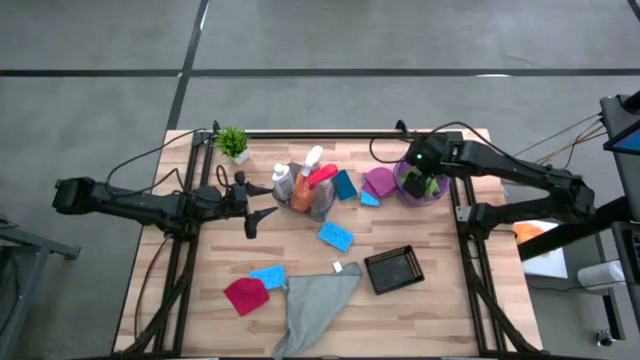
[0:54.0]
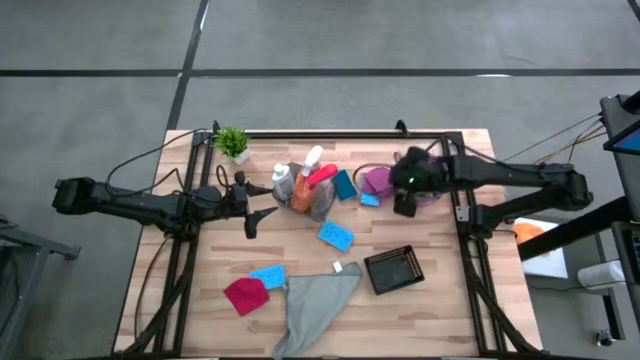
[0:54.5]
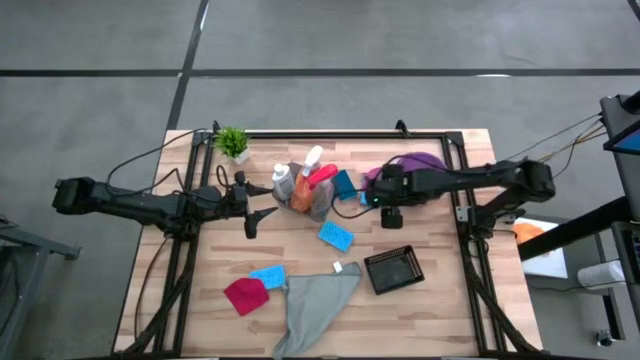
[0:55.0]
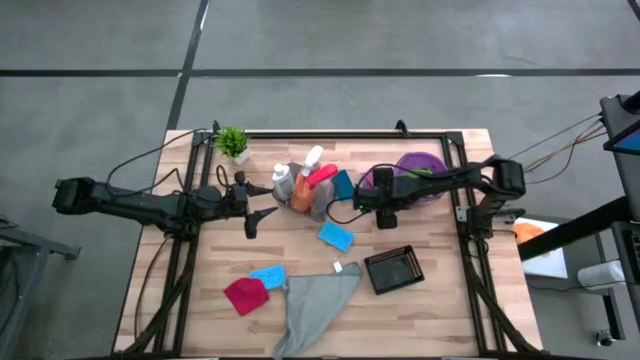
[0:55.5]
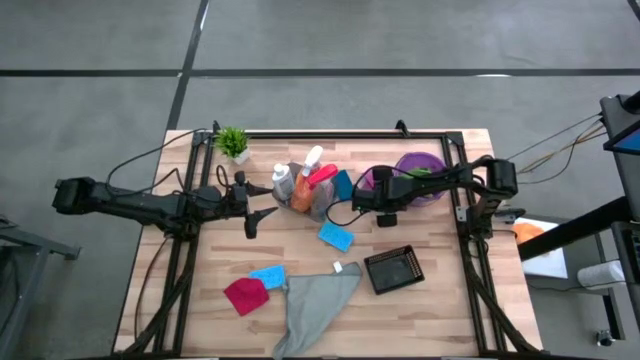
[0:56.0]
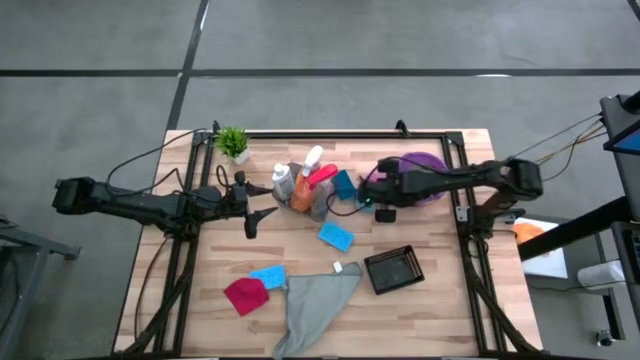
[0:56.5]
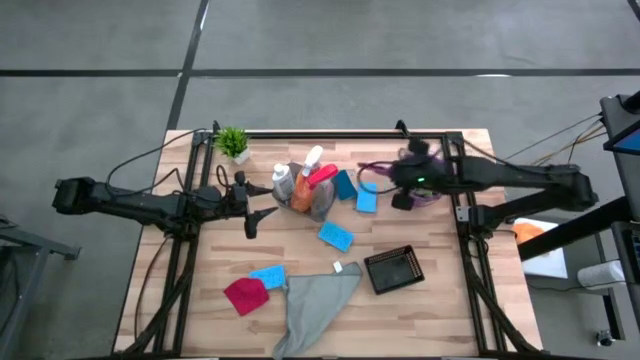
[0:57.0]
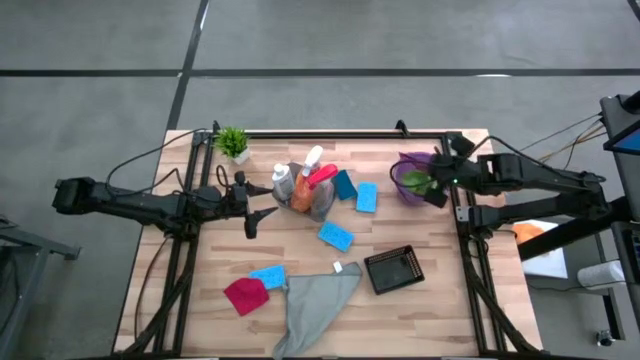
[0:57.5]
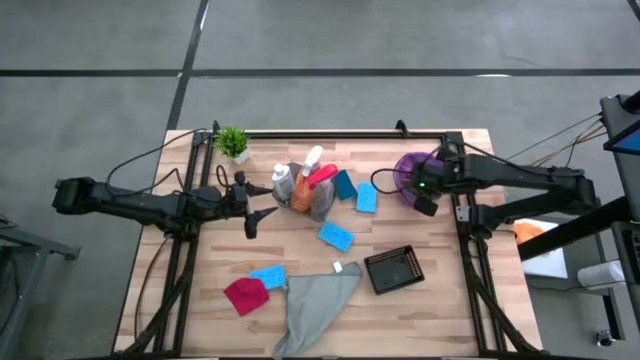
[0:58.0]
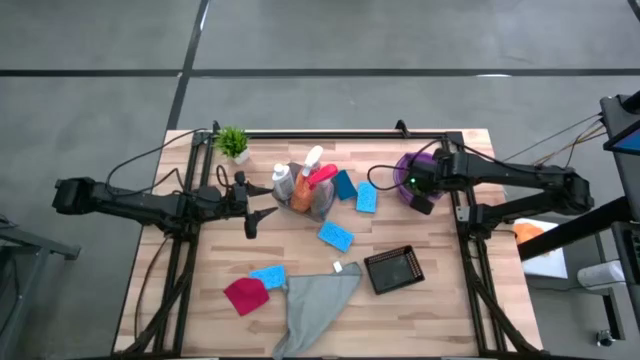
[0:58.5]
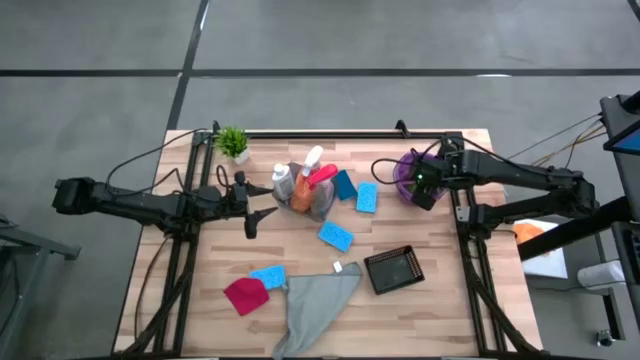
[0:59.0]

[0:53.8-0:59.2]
Task: Pick & Place Kitchen Items
Put the purple microfiber towel into the purple bucket

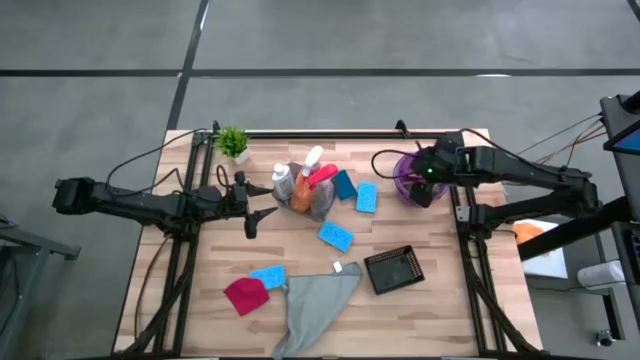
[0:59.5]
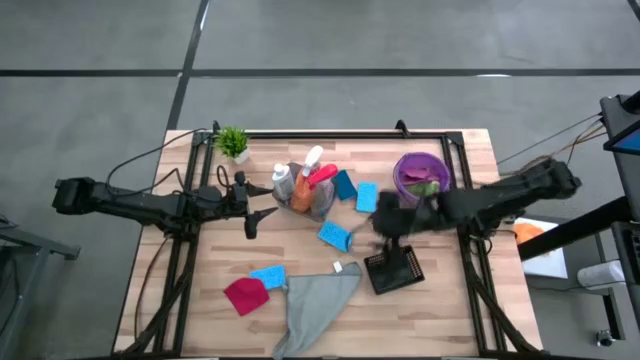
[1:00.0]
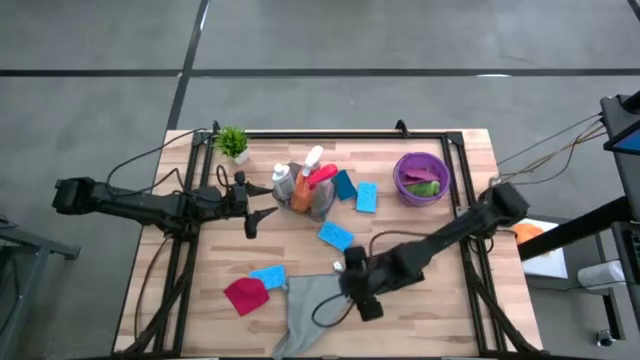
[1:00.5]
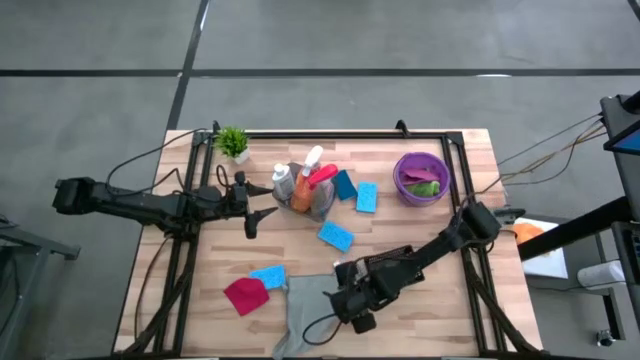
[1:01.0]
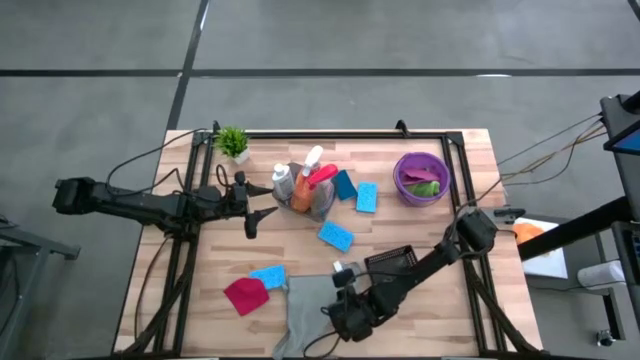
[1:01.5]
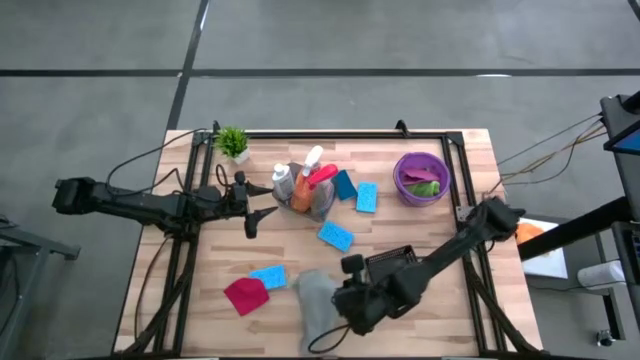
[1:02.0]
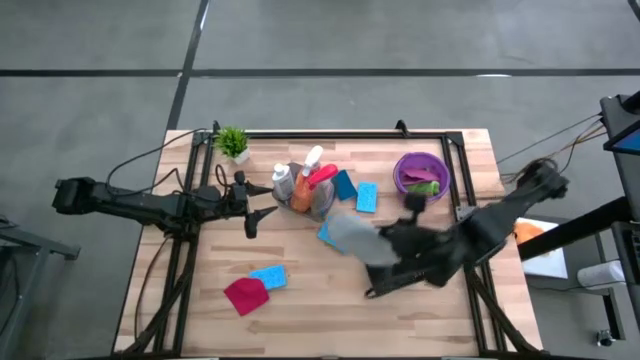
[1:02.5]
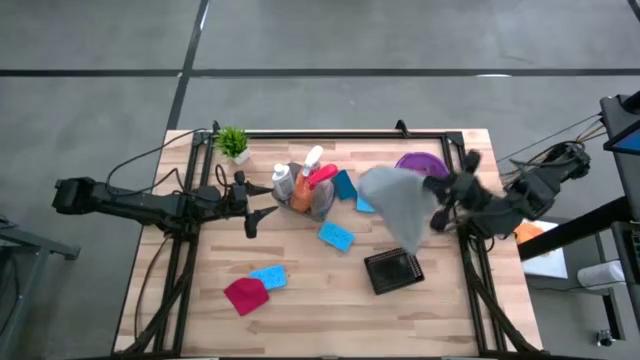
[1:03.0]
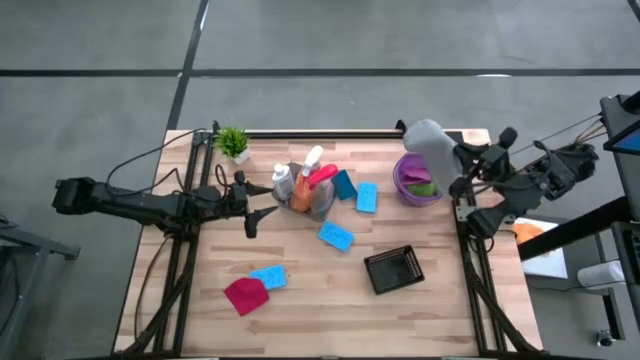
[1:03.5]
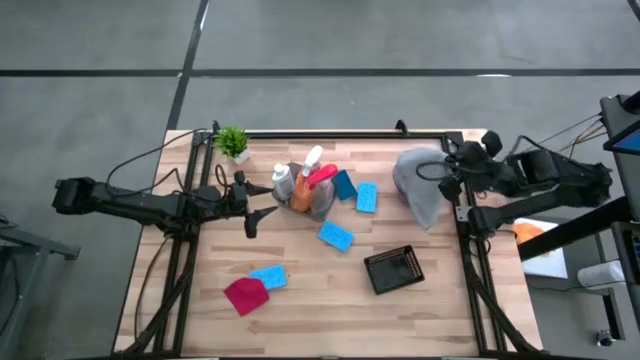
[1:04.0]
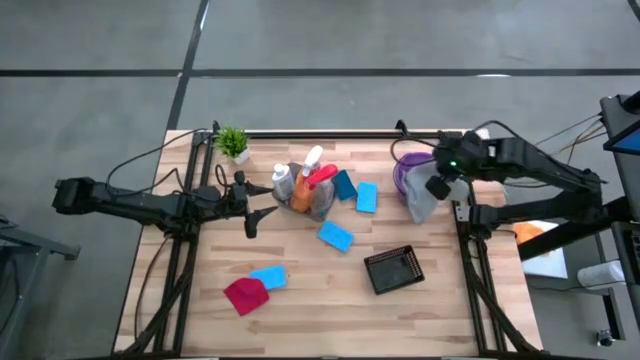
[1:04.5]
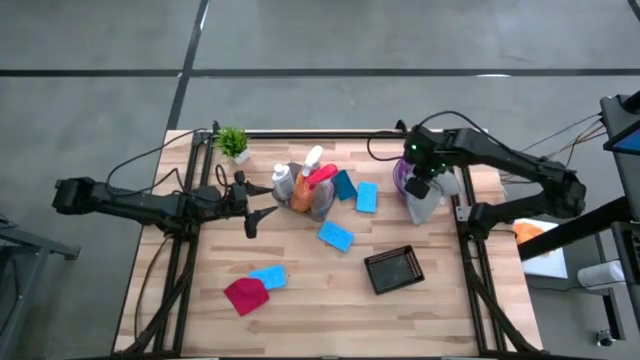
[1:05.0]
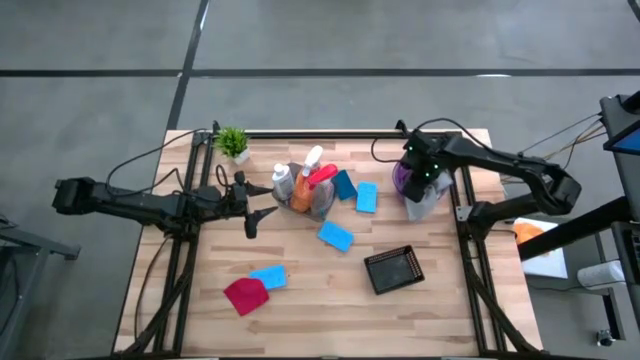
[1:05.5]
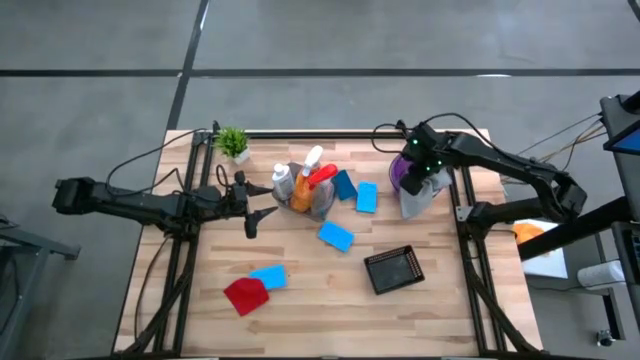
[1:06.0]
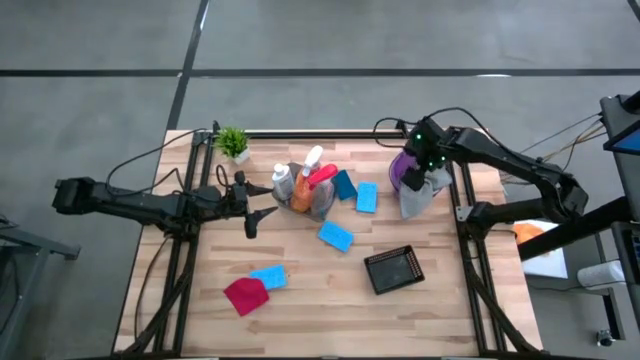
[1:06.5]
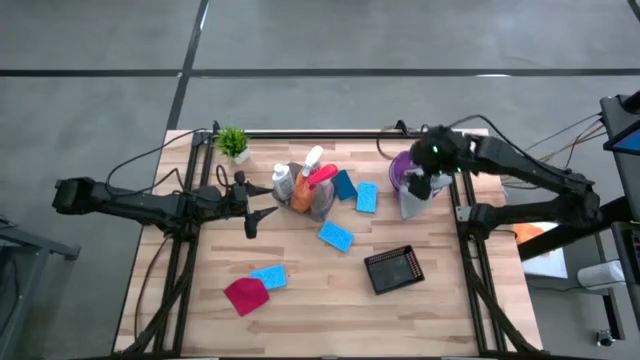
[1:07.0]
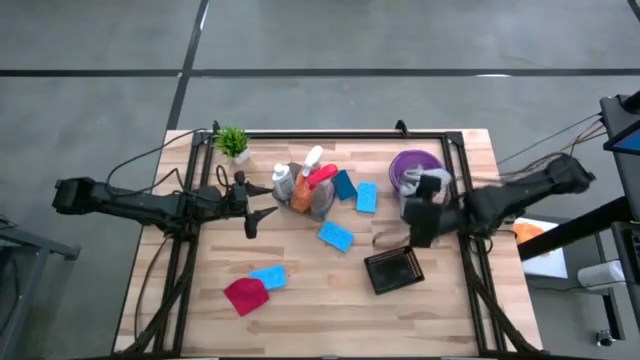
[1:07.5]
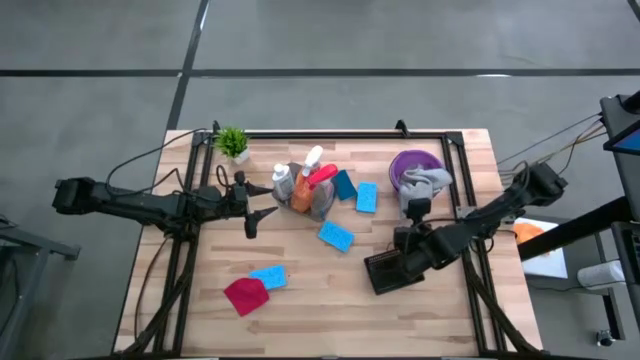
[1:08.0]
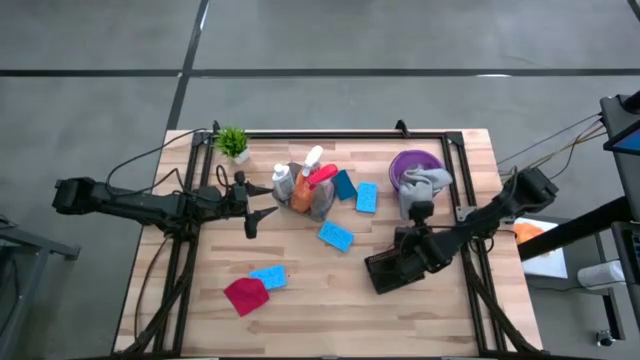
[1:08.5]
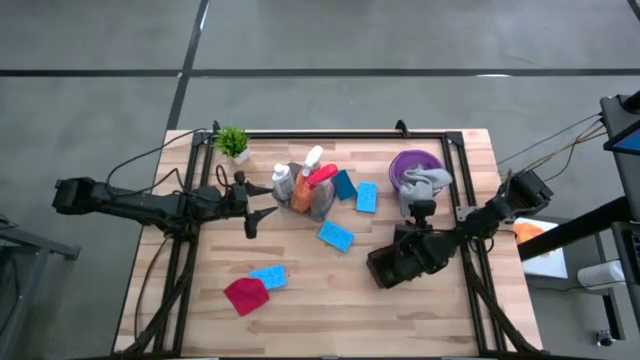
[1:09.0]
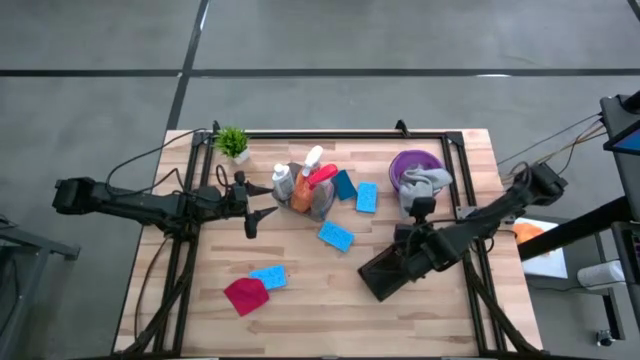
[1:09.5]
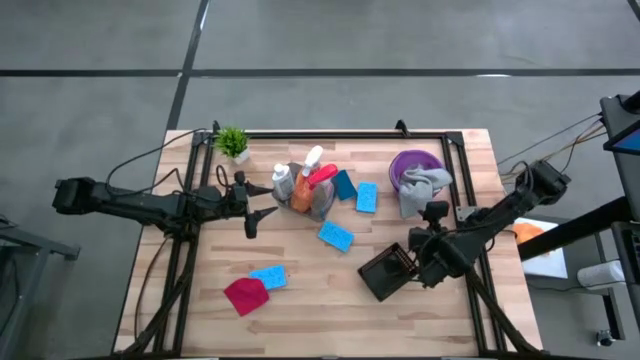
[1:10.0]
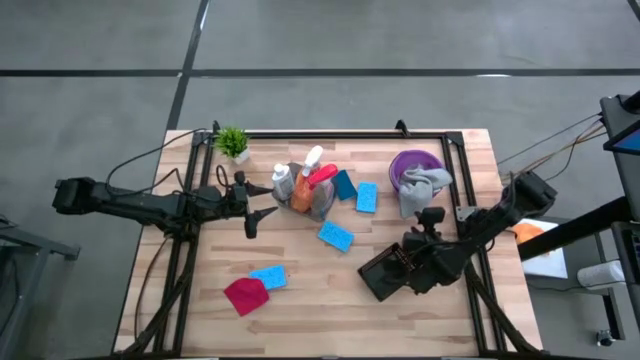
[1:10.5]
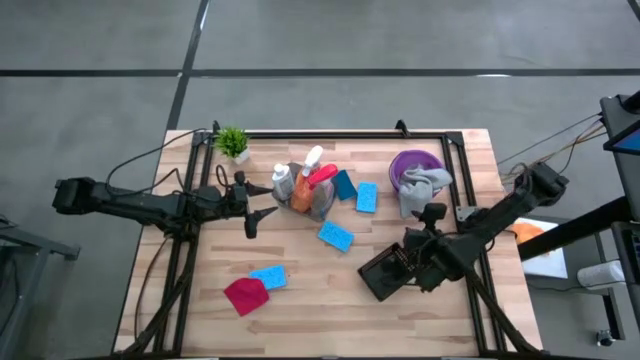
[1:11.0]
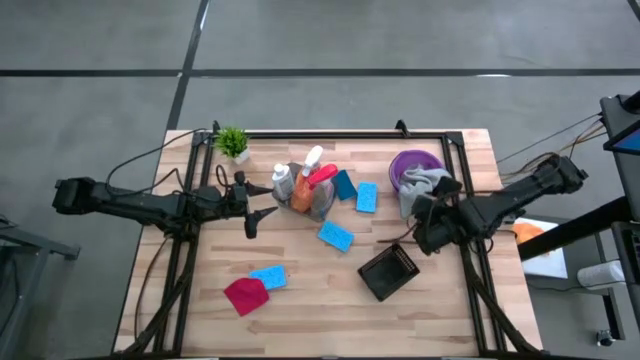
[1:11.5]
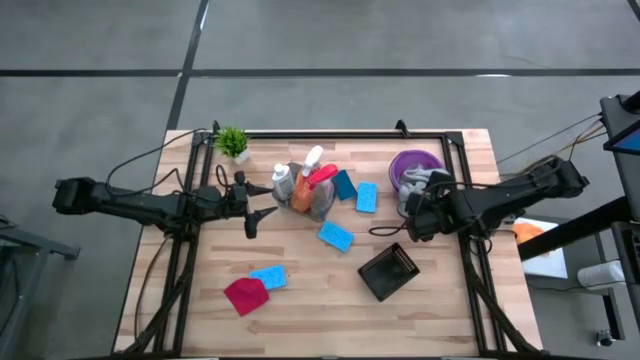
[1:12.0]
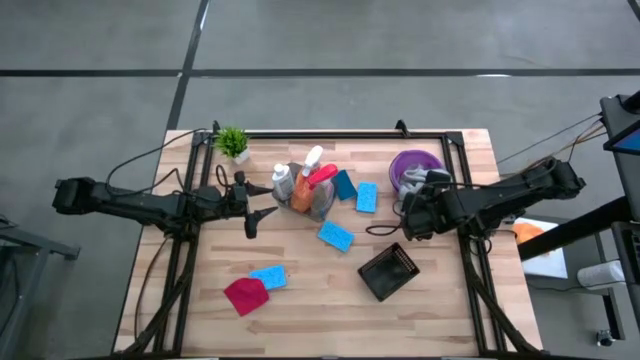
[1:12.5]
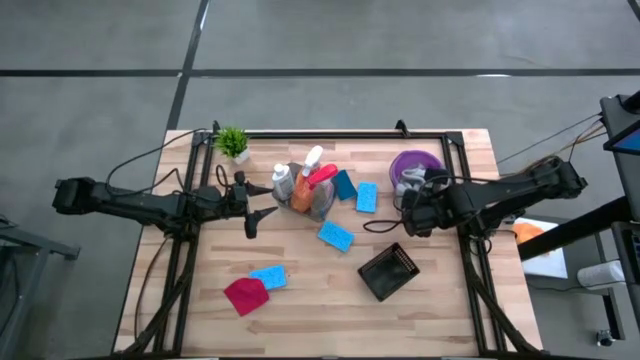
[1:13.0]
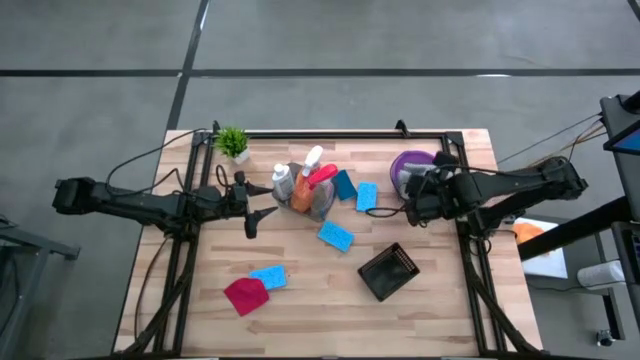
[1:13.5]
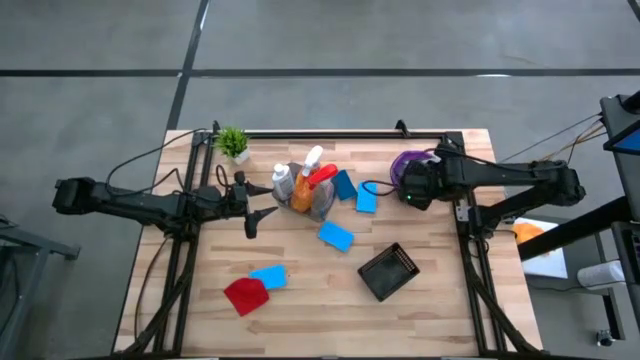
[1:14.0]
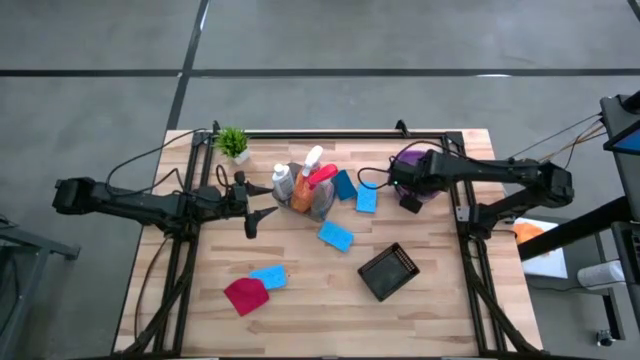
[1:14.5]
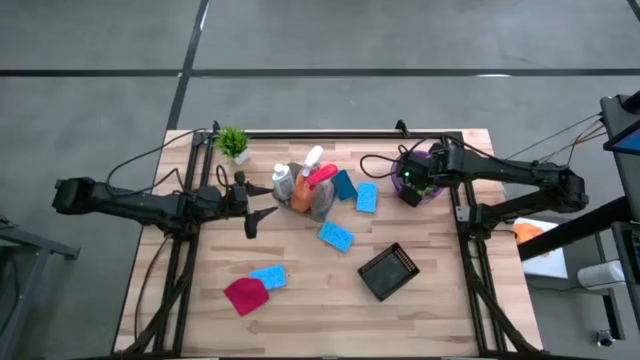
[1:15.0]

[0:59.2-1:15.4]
Put the gray microfiber towel into the purple bucket
